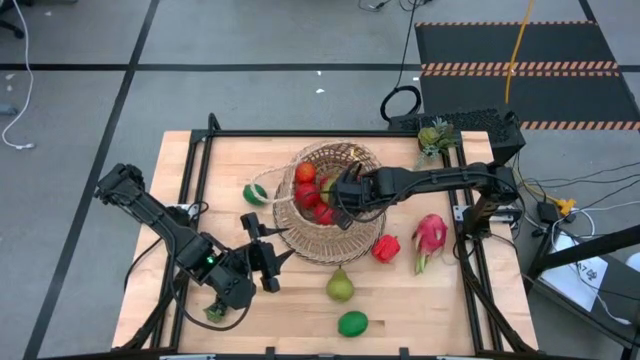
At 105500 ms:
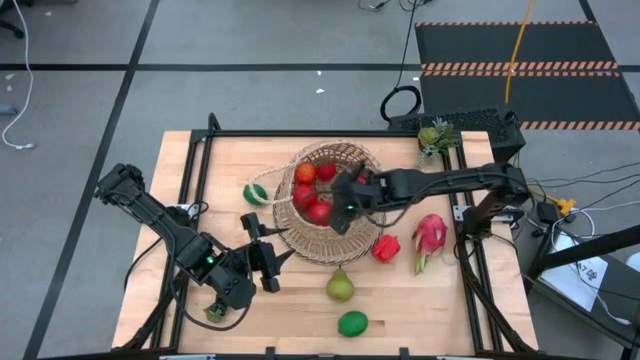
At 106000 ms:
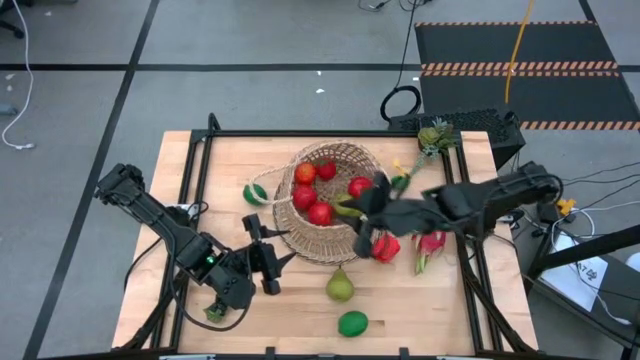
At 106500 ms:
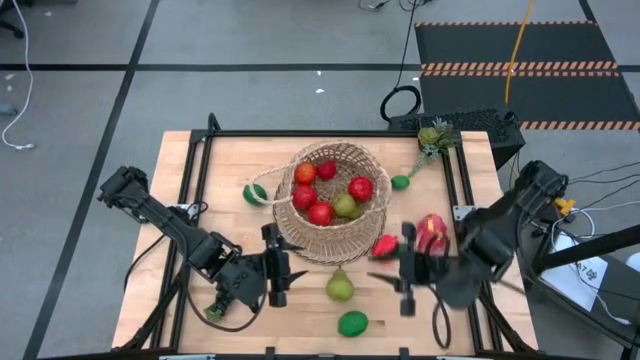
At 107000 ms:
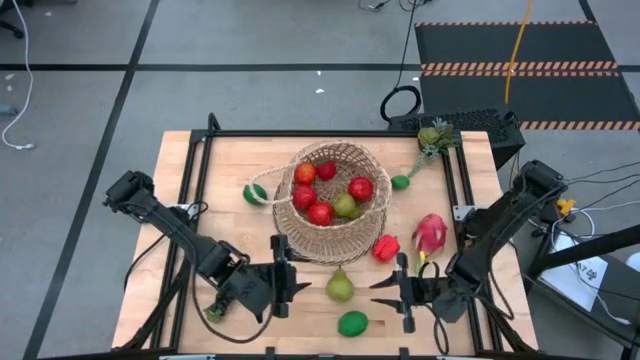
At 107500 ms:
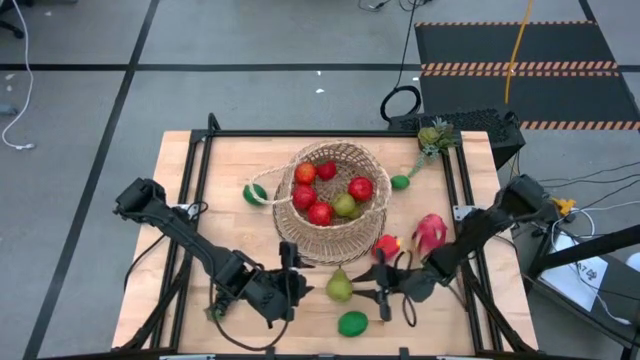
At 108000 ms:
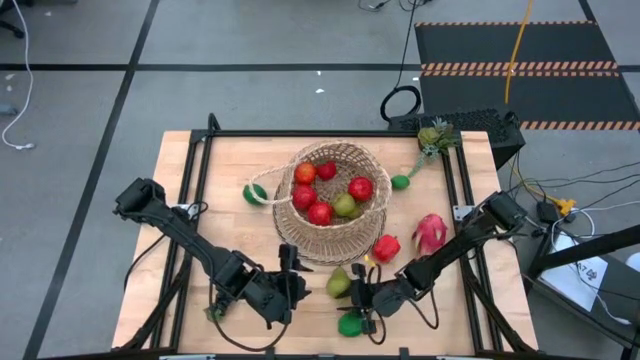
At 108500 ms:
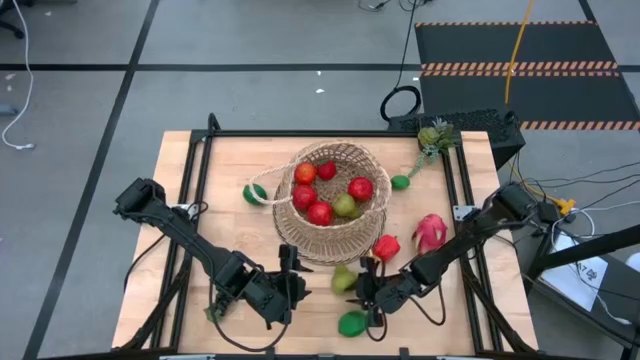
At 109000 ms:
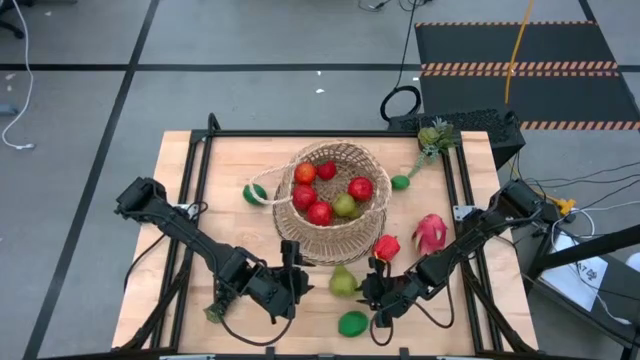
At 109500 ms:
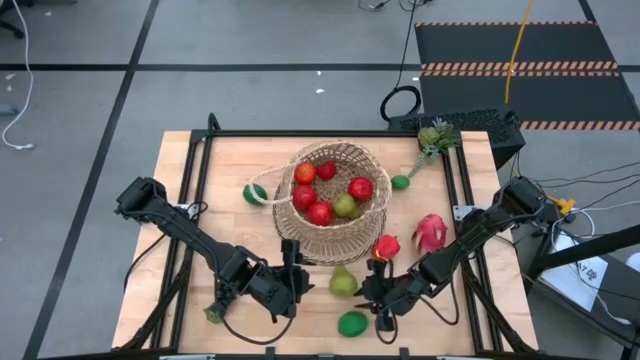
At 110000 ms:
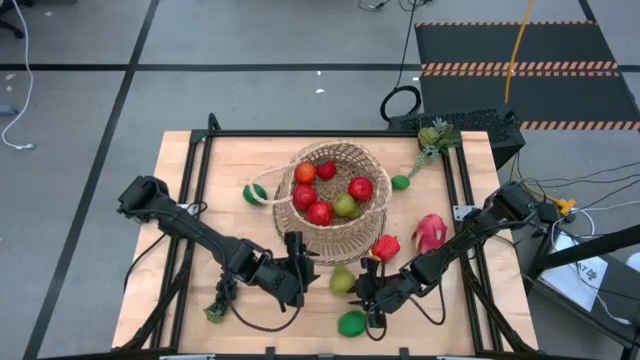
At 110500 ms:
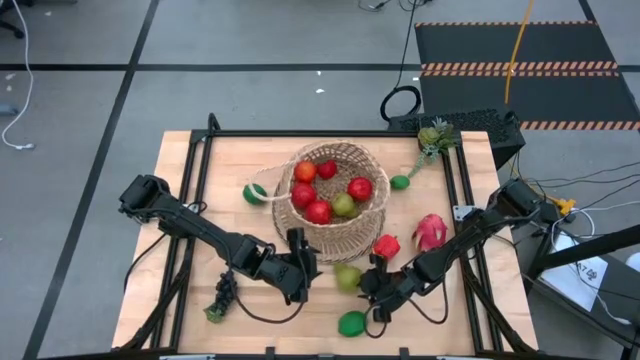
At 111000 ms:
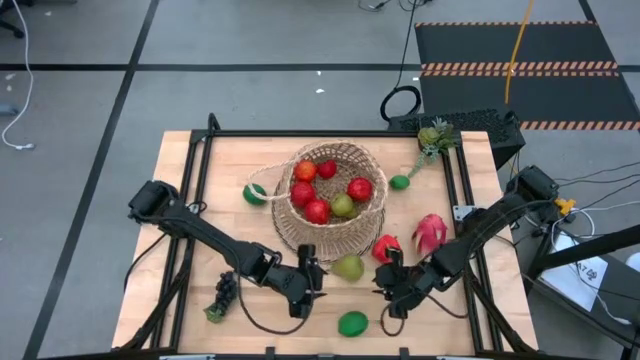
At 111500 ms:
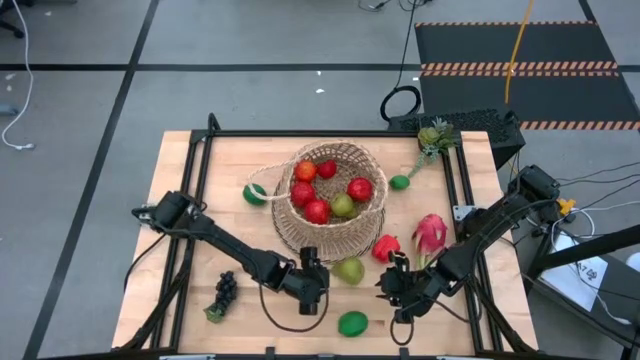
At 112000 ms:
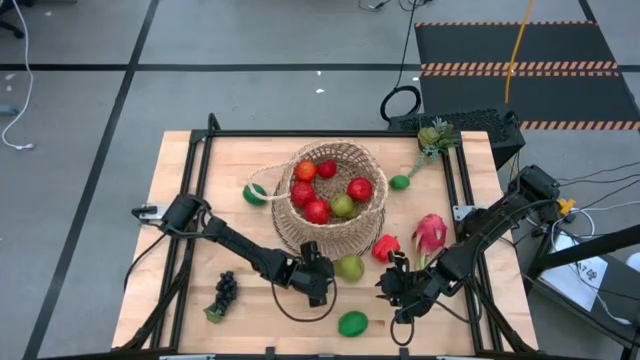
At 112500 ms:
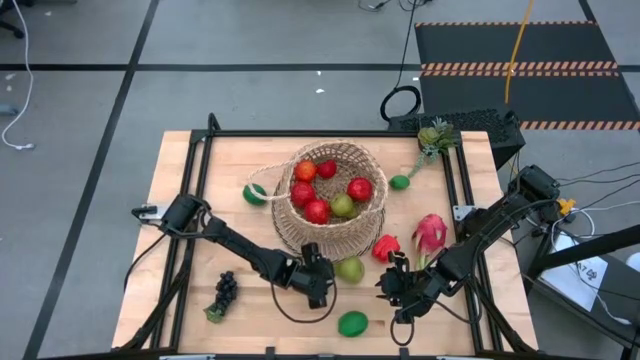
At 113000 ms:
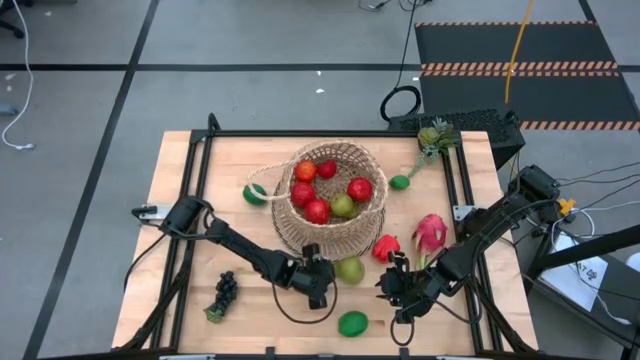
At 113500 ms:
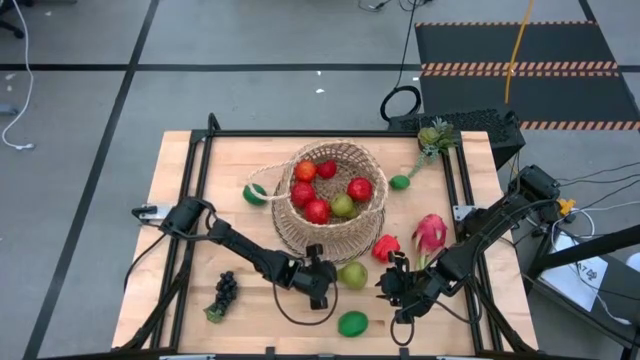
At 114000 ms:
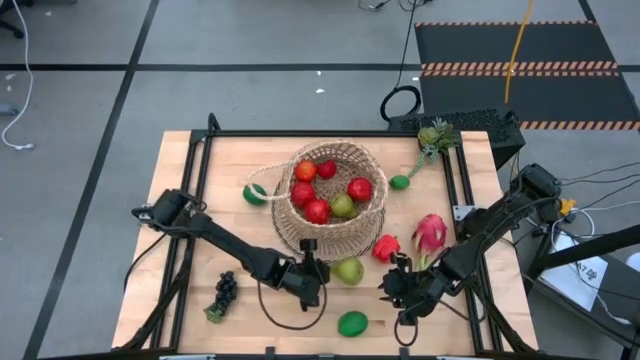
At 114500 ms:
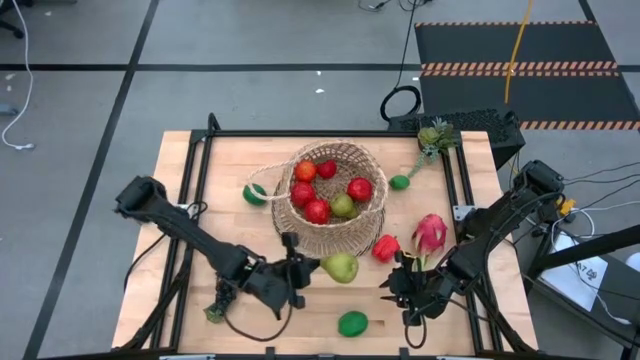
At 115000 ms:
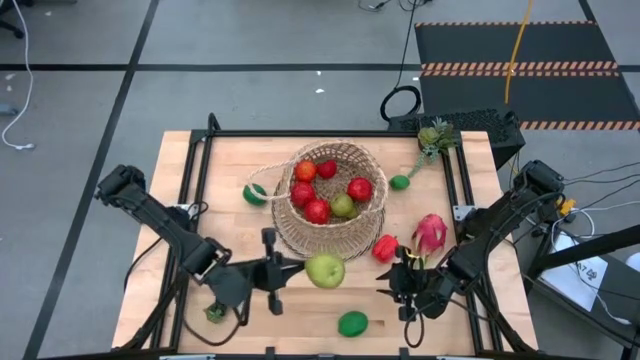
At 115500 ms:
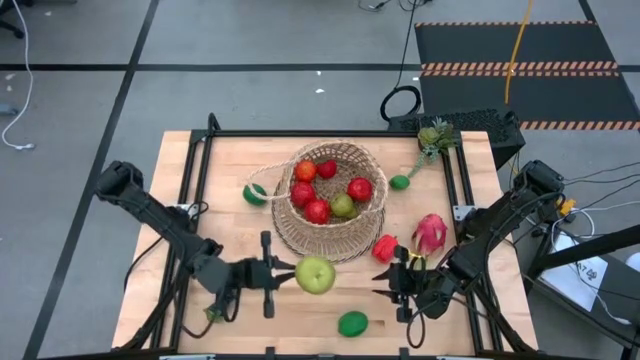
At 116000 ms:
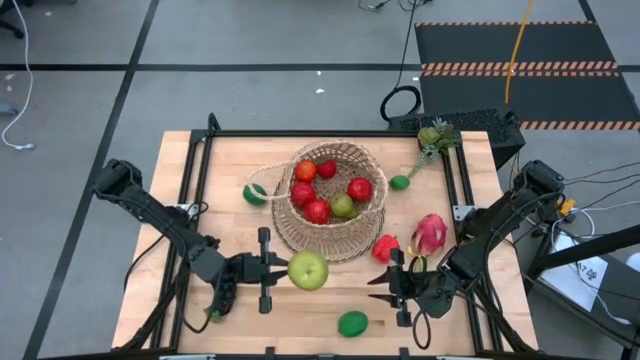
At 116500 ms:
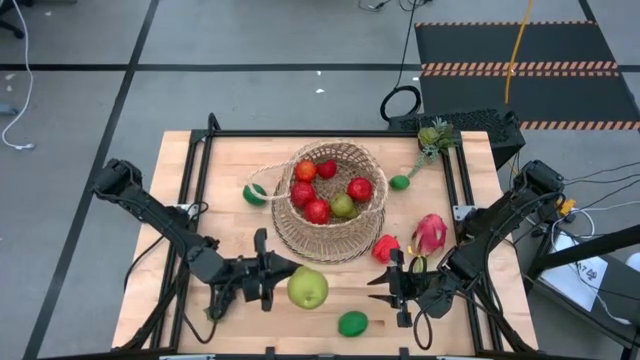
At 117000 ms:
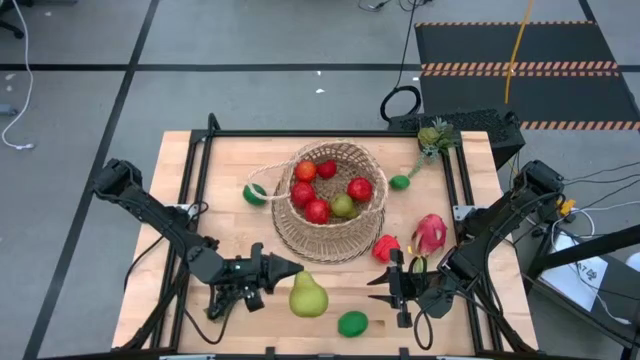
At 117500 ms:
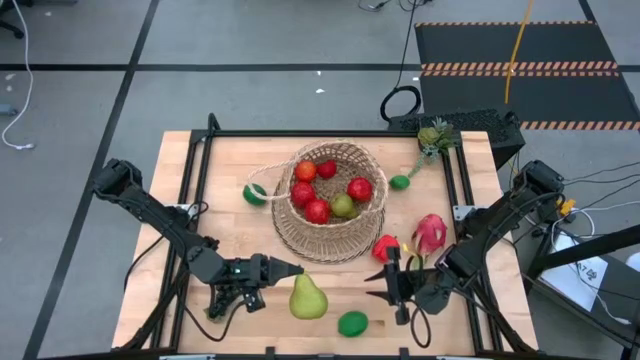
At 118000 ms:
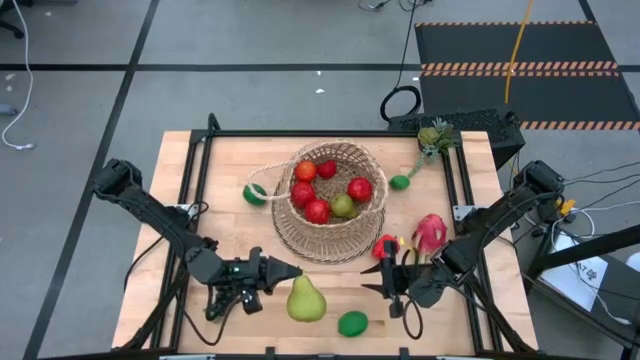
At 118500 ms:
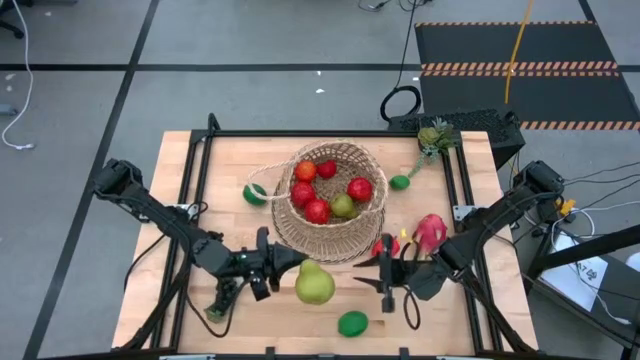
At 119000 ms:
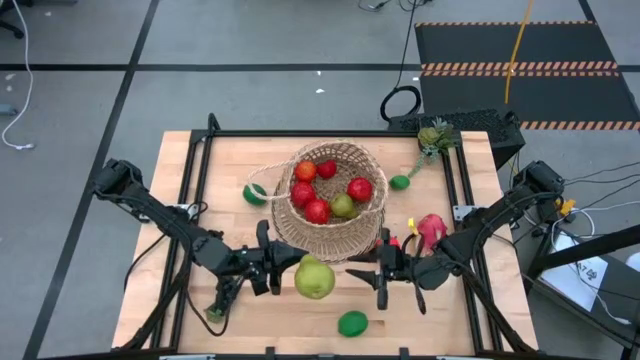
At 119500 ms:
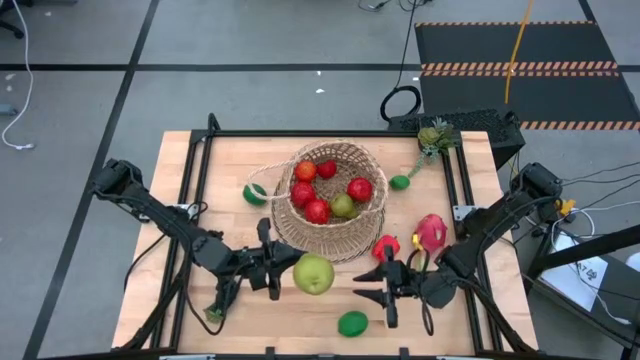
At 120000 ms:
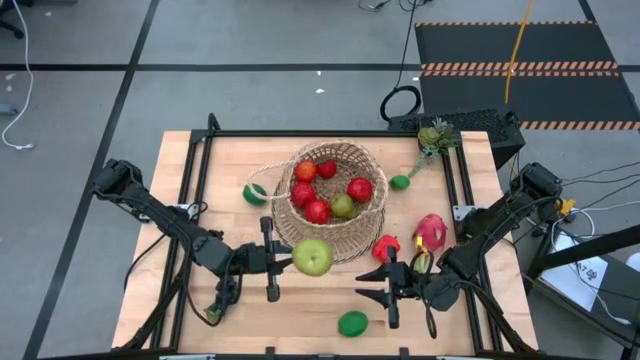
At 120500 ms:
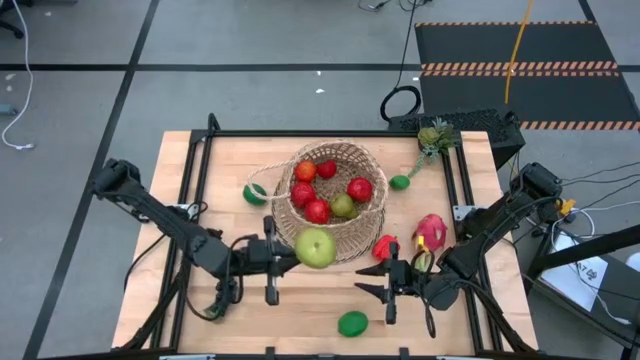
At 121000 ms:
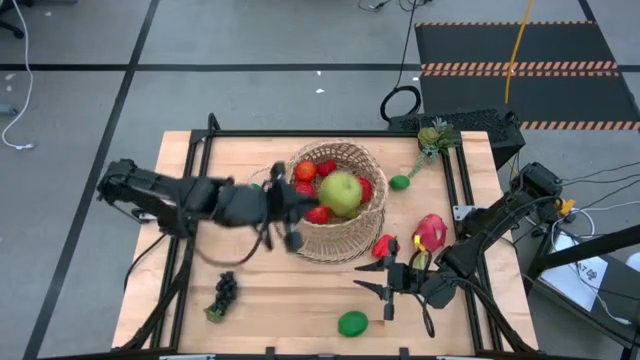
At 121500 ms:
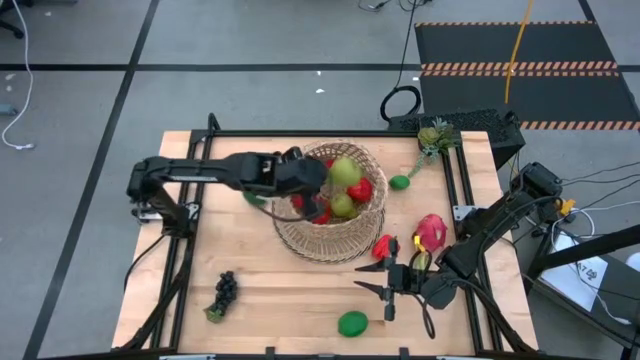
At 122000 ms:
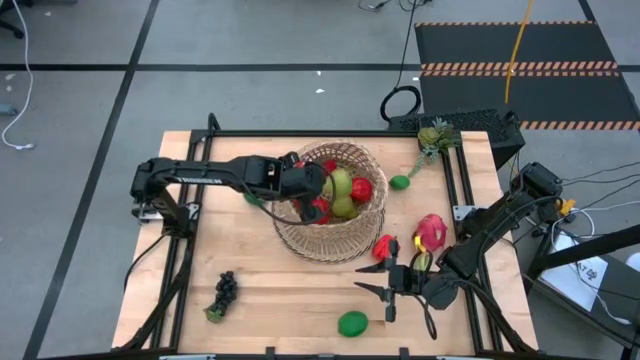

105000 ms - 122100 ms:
Task: Build produce basket
Put the green pear into the basket

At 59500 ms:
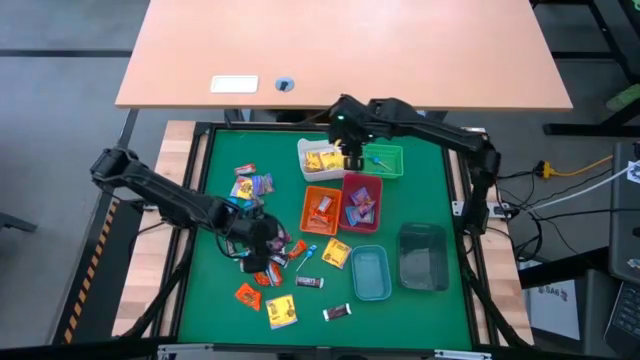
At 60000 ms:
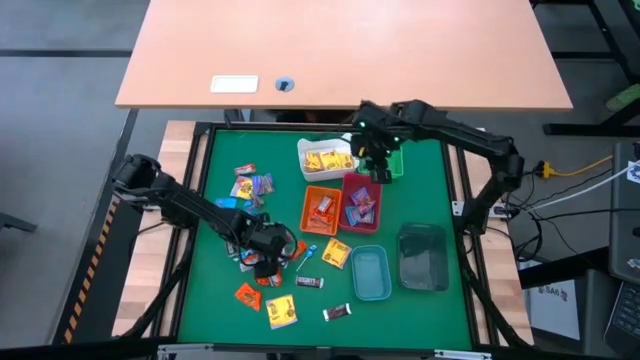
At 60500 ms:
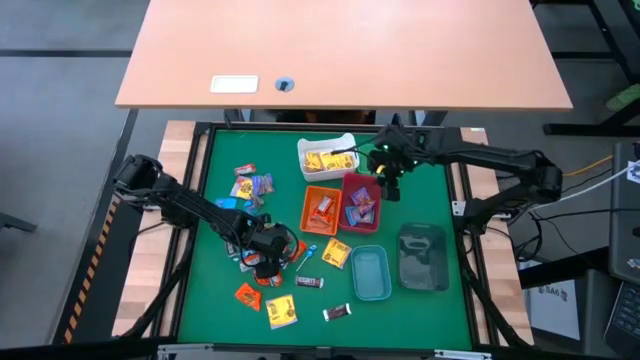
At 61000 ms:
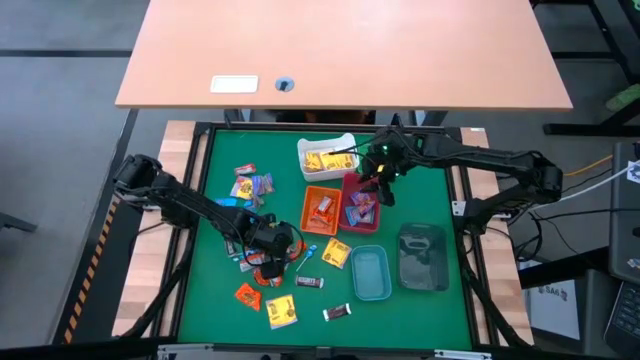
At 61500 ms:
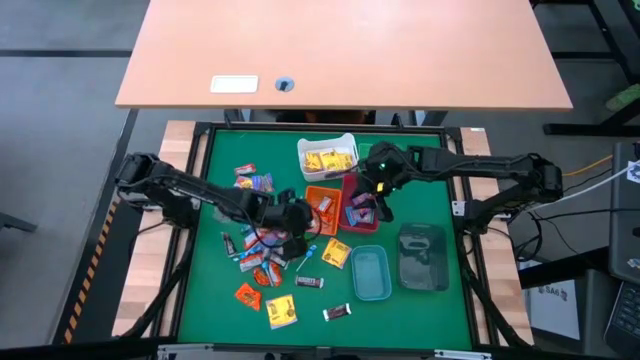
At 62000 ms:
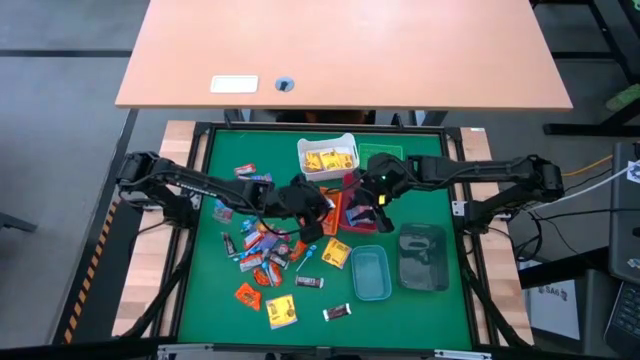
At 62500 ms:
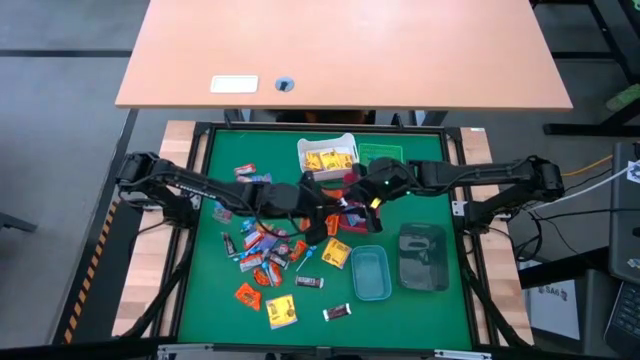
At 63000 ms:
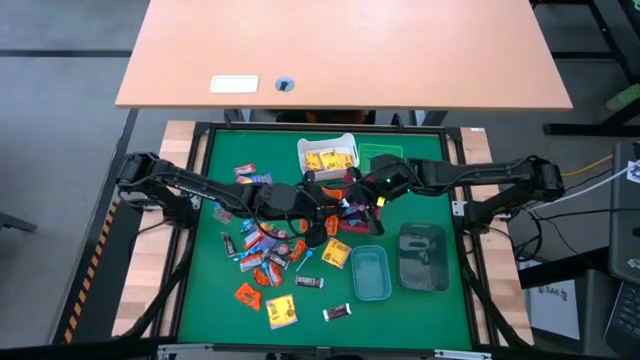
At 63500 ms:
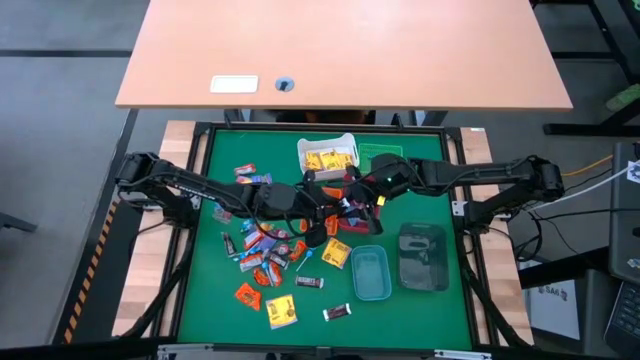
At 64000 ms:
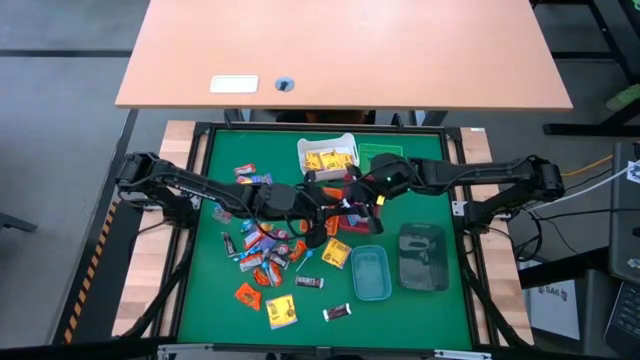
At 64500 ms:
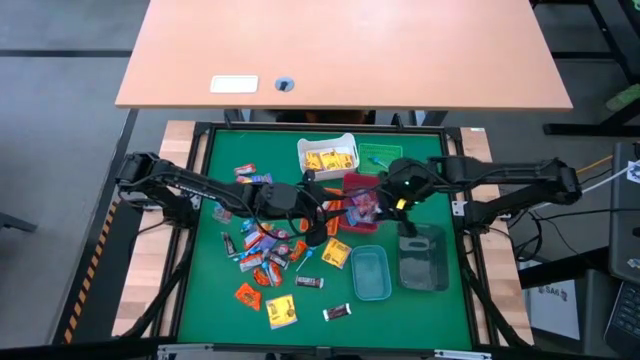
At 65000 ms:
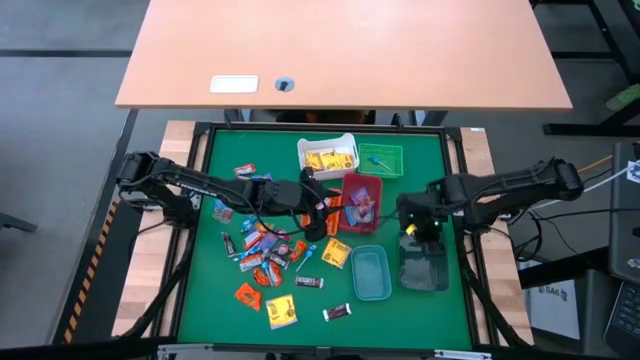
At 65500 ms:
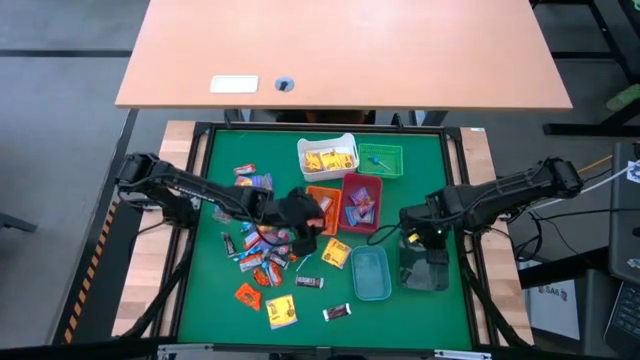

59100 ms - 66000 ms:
Task: Sort candy
Put the brown chocolate into the gray bin
